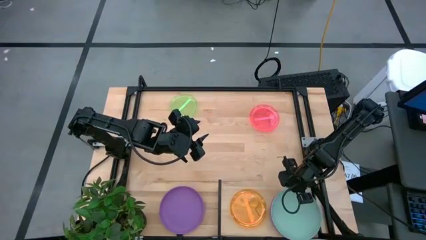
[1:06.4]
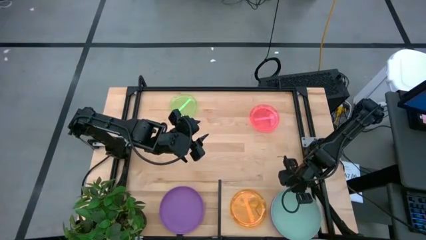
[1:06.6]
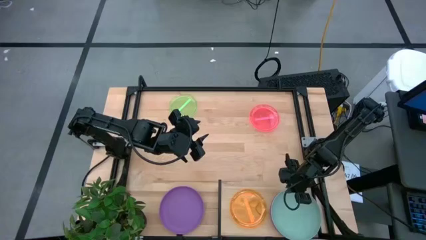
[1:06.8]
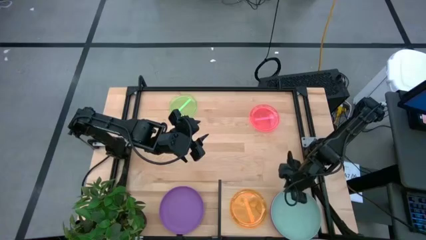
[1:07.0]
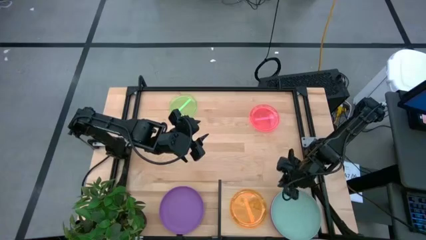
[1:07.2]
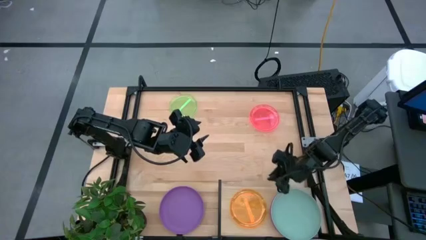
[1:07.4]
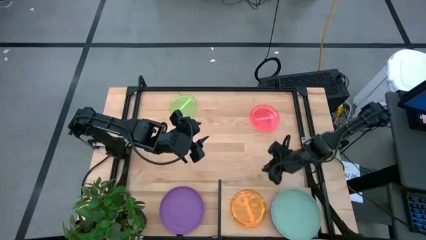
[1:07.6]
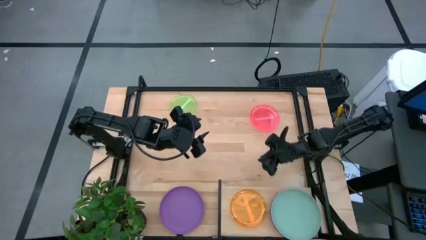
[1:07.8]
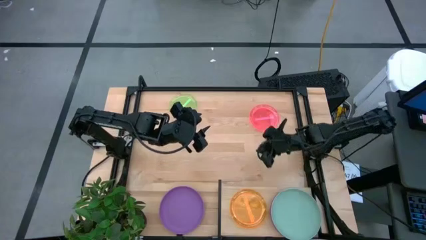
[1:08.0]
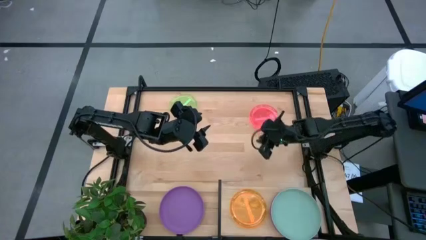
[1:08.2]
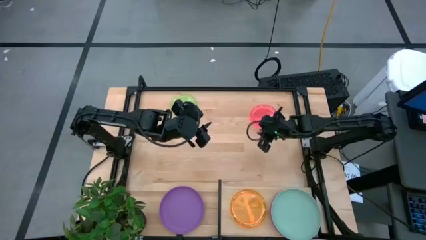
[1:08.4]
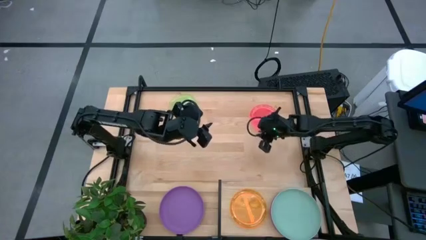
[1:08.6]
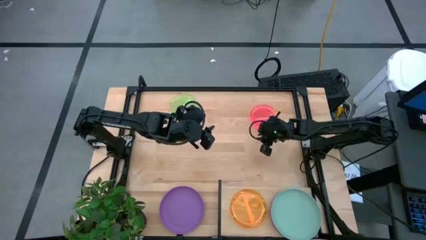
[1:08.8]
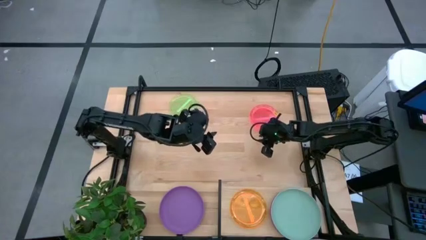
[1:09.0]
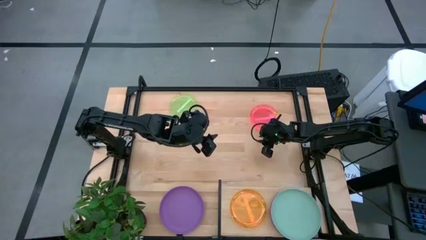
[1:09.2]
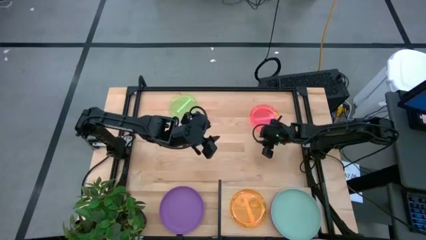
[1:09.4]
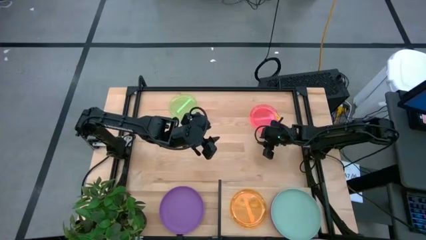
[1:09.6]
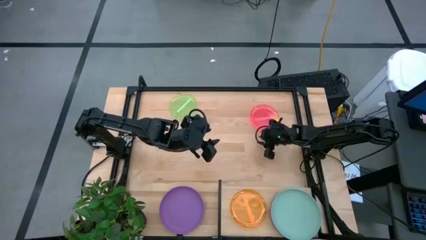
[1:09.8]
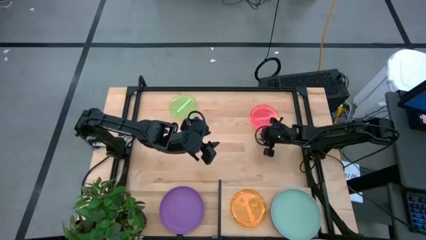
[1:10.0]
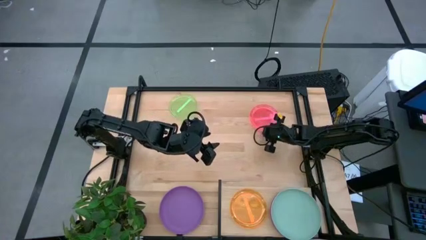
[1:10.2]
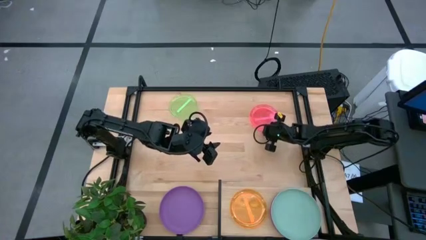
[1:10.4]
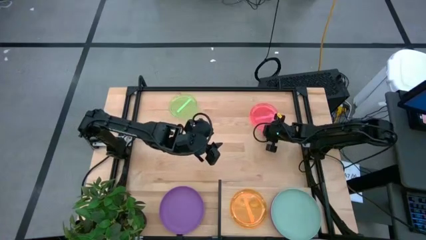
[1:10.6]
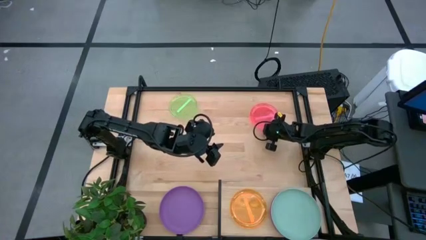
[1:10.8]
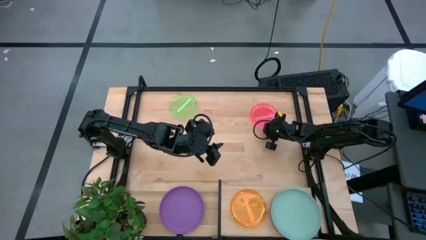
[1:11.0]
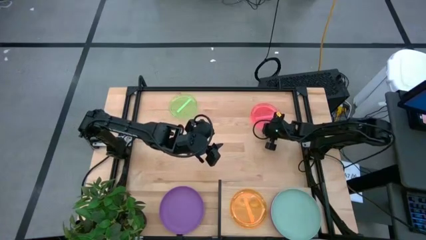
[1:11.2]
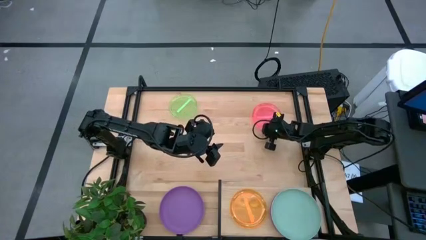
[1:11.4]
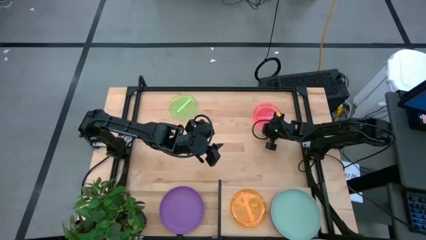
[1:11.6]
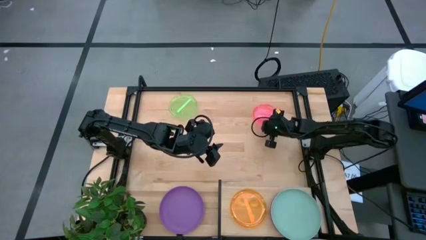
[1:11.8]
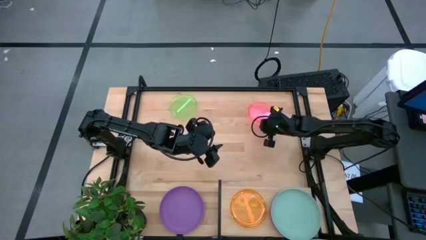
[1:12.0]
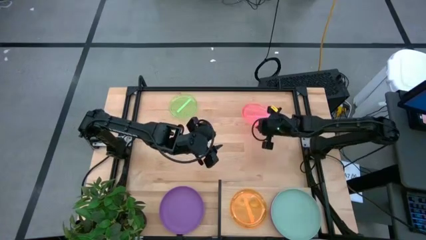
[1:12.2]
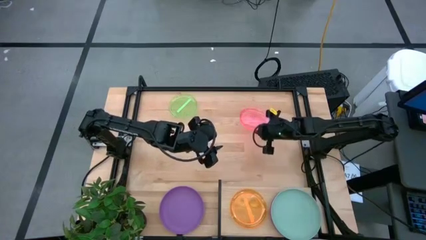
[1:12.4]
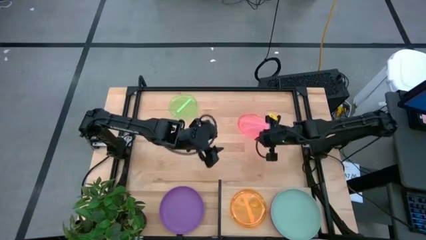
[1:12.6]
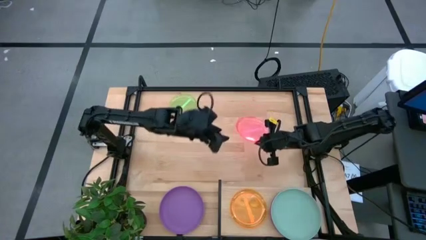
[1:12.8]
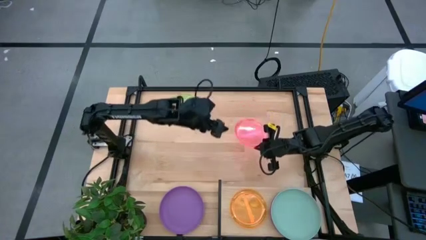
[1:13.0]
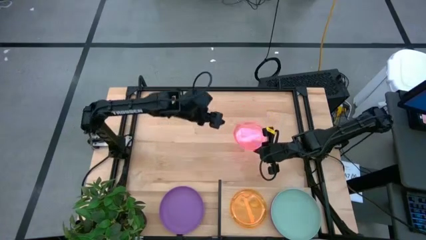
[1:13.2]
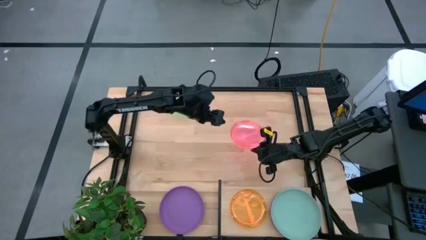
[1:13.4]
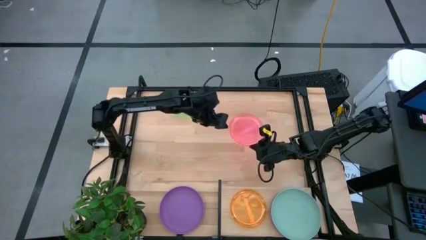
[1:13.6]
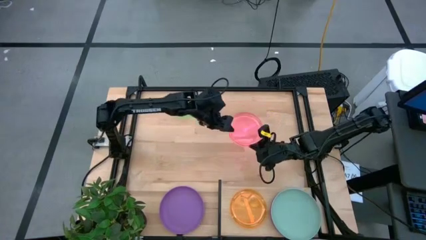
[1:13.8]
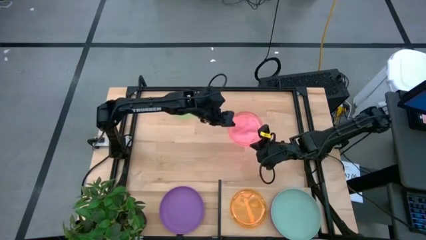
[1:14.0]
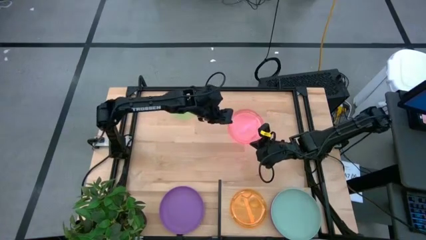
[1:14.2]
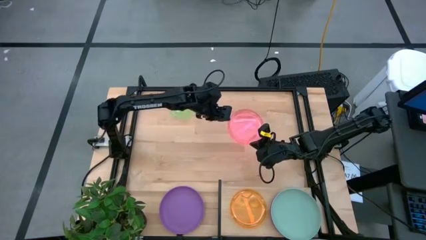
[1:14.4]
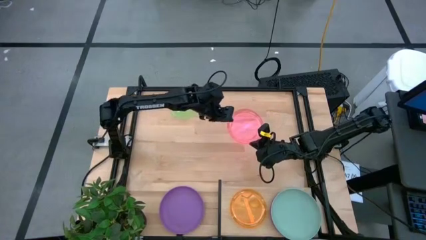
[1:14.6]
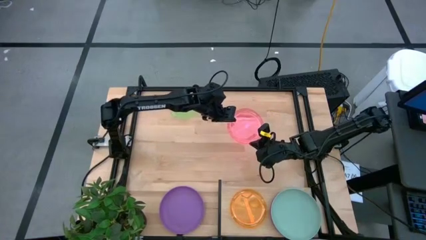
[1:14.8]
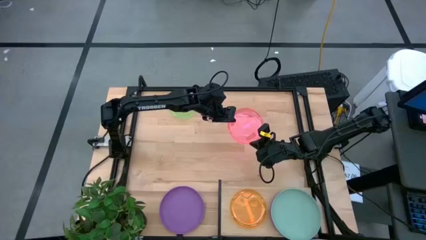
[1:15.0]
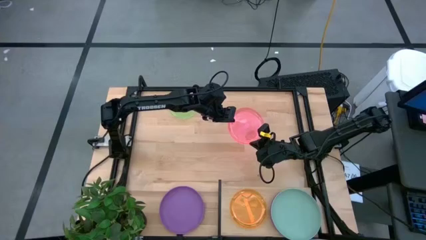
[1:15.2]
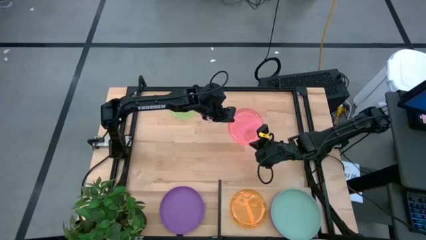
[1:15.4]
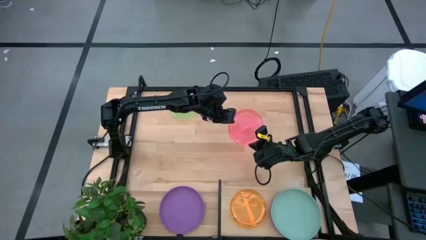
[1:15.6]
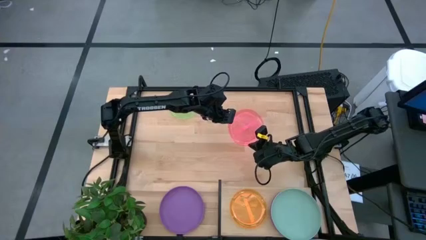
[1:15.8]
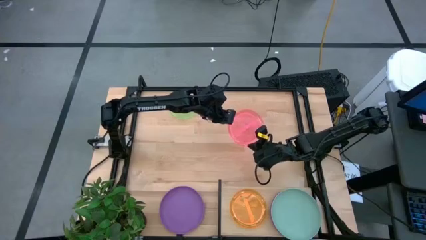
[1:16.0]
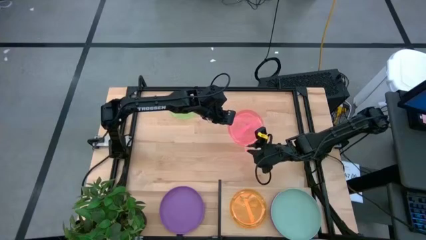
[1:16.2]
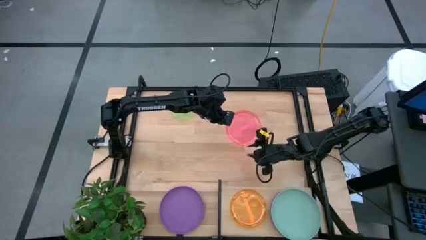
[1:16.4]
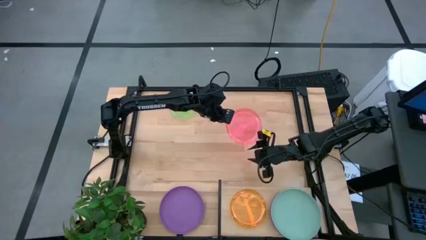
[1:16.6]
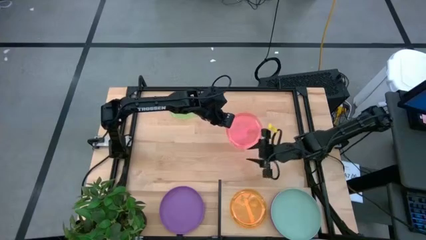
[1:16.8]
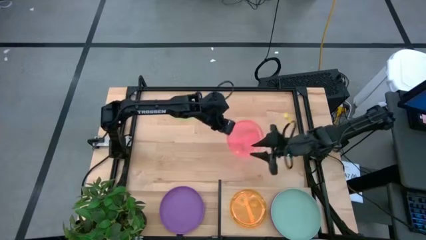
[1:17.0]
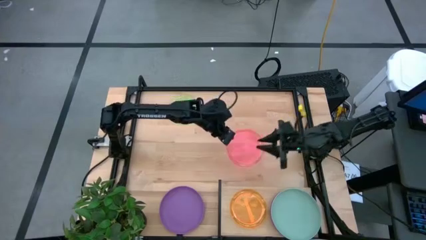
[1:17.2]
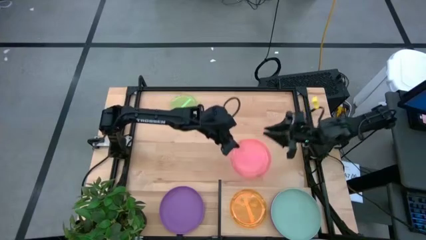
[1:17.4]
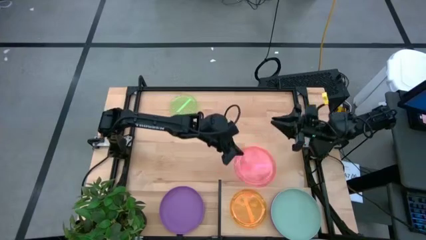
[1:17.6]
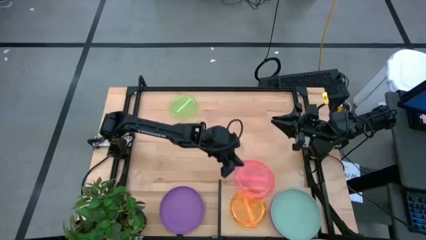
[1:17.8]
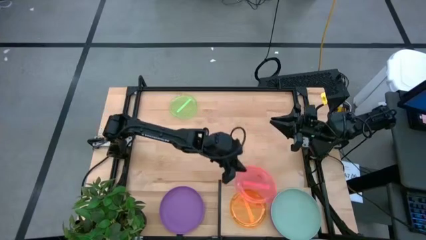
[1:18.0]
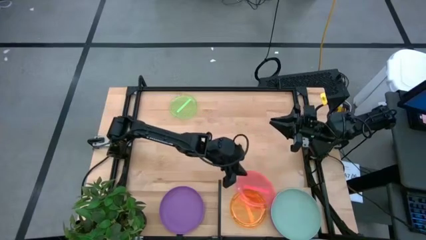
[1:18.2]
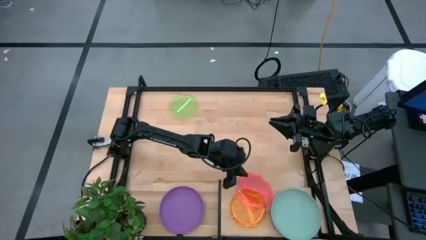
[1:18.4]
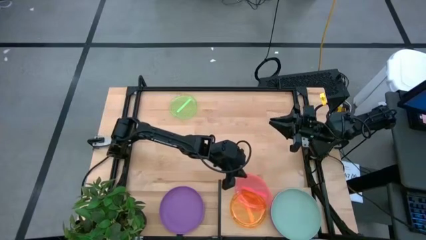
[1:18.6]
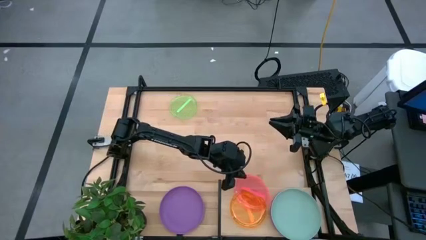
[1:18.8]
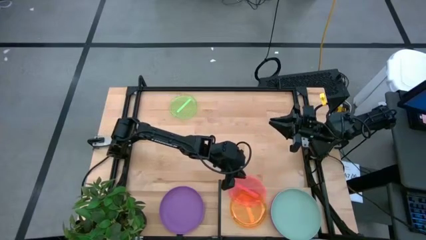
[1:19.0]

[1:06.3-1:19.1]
Task: Place and stack plates onto a shelf
Stack the red plate on top of the orange plate on the shelf

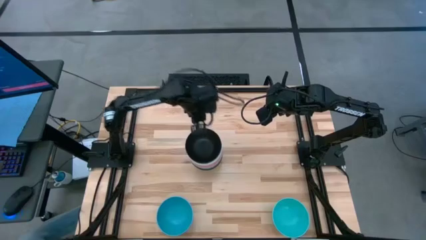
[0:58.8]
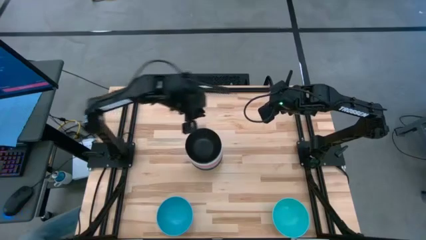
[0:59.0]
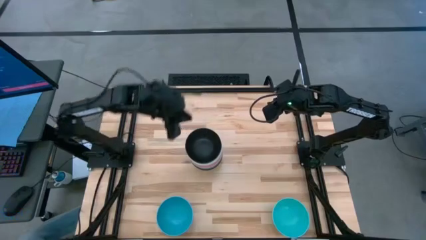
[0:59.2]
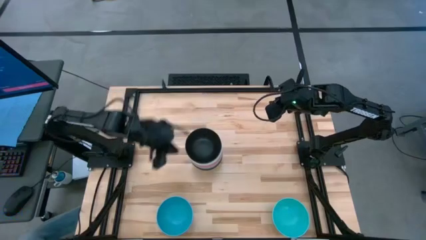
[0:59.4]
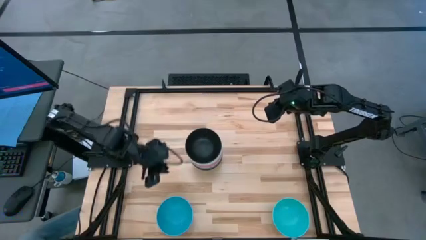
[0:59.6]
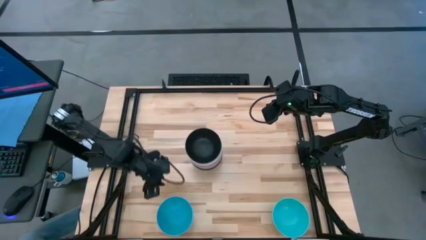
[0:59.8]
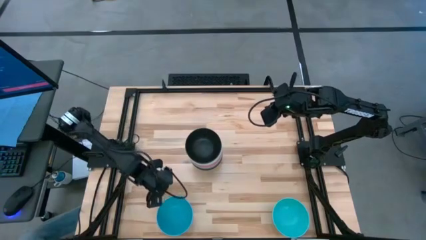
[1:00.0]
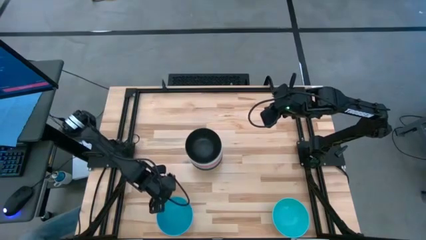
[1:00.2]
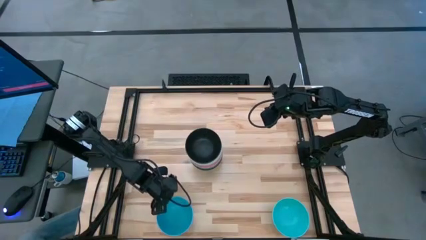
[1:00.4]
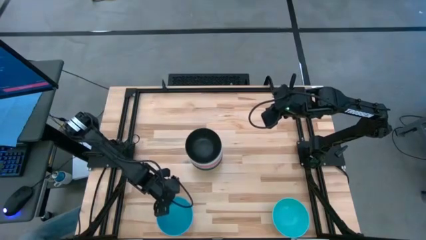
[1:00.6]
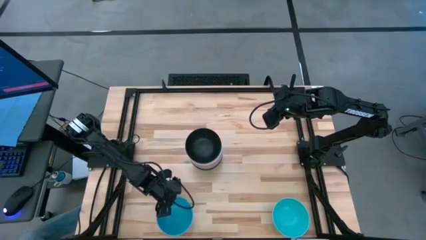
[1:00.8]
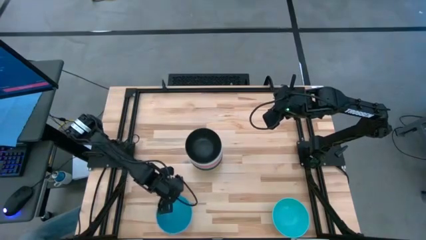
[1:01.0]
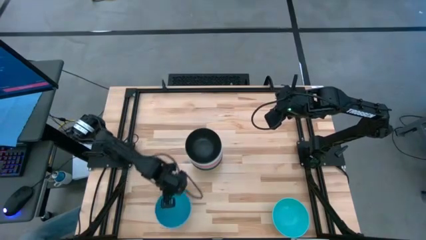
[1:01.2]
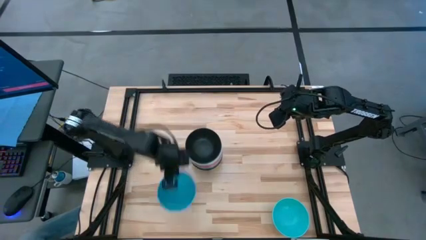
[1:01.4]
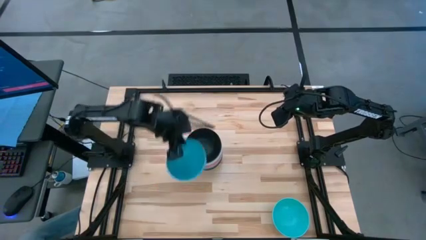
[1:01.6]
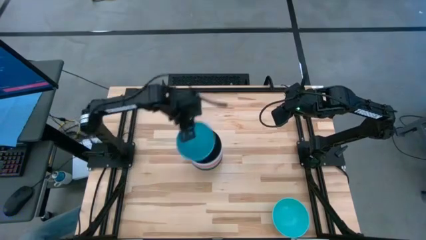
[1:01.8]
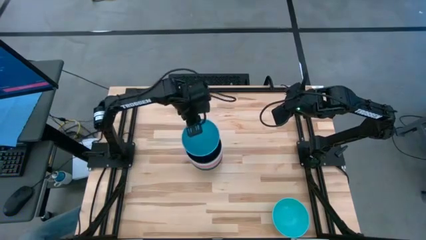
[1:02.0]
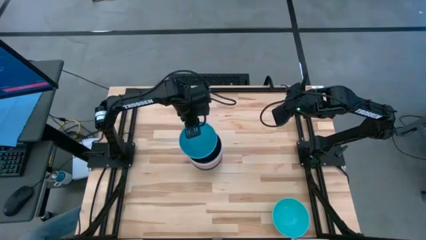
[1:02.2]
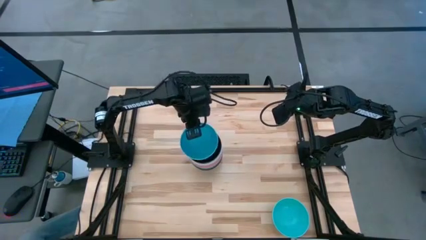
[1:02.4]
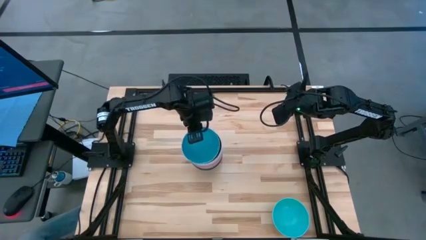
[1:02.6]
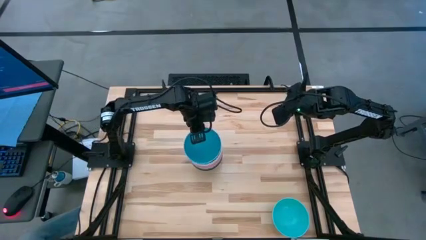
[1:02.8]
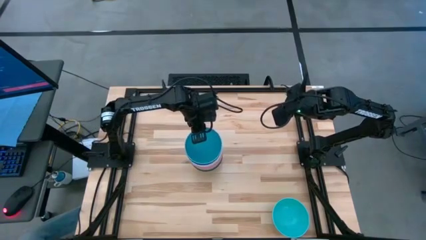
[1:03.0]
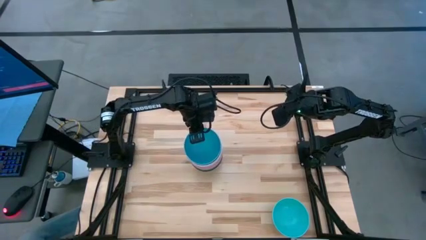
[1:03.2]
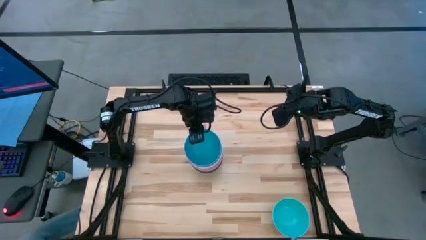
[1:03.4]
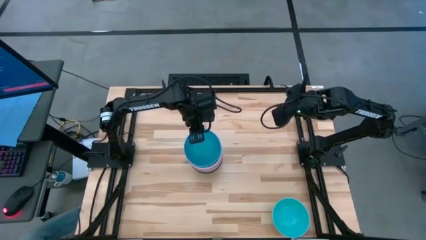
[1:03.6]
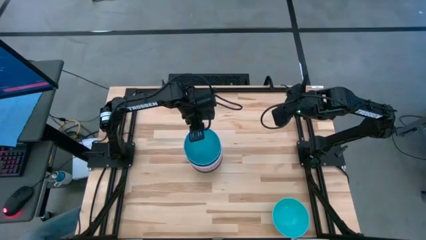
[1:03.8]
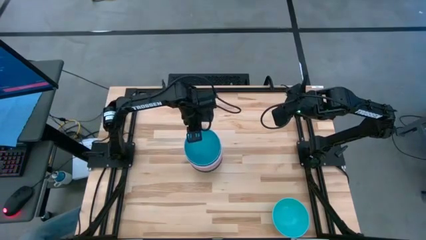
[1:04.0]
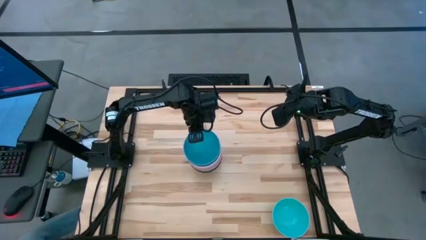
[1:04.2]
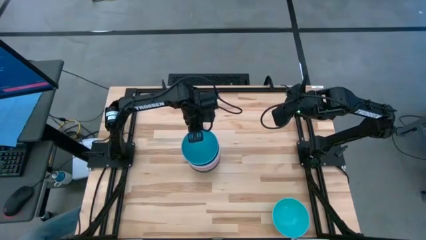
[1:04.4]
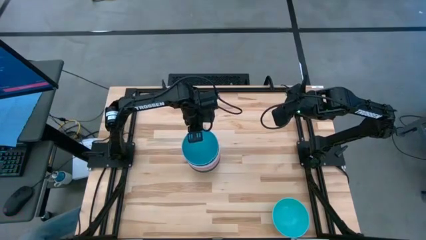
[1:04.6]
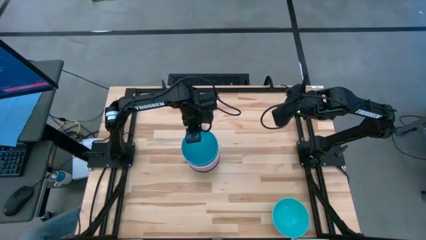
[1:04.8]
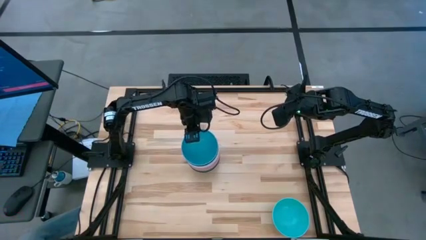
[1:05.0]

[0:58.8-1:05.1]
Task: Nest bowls inside each other
Stack the left blue bowl on top of the black bowl
